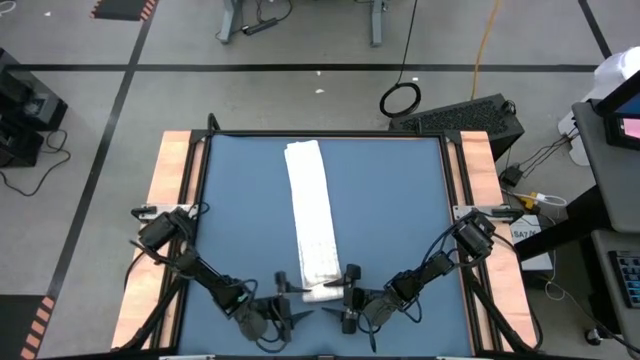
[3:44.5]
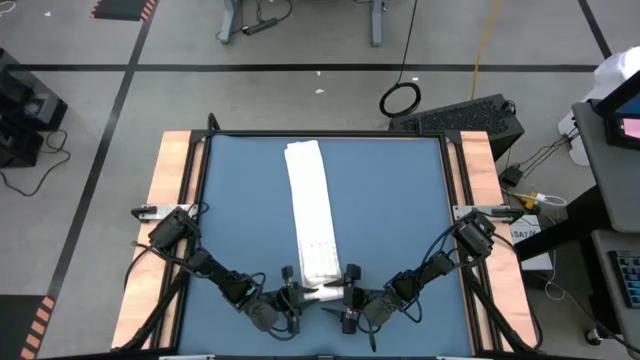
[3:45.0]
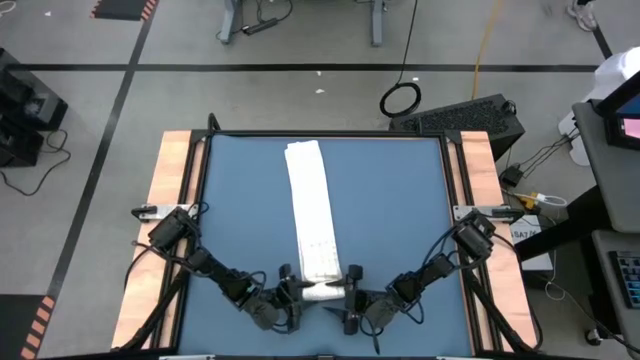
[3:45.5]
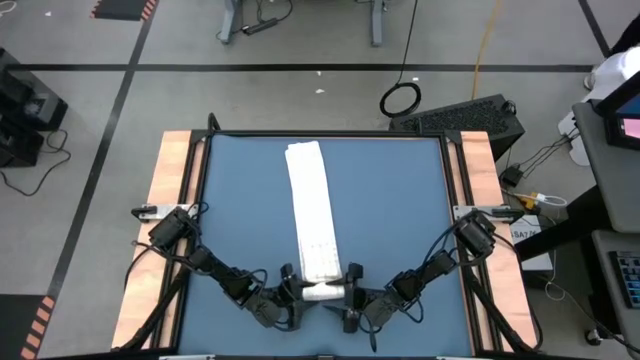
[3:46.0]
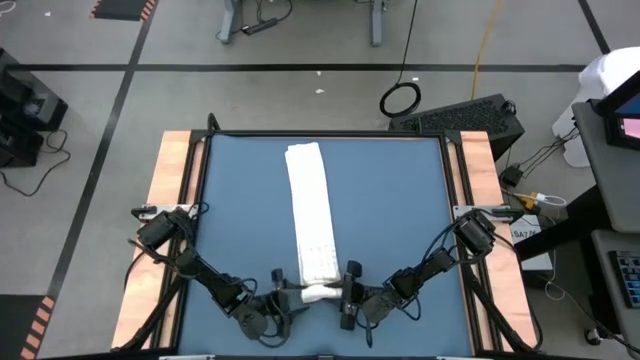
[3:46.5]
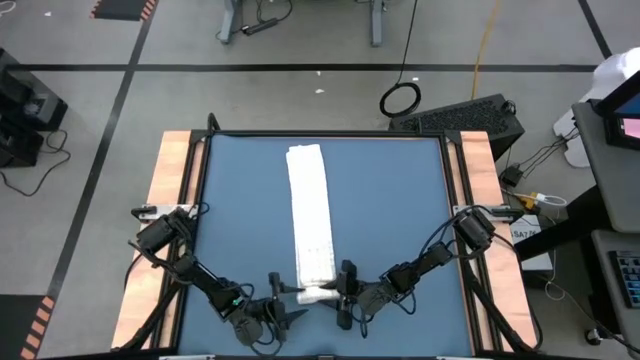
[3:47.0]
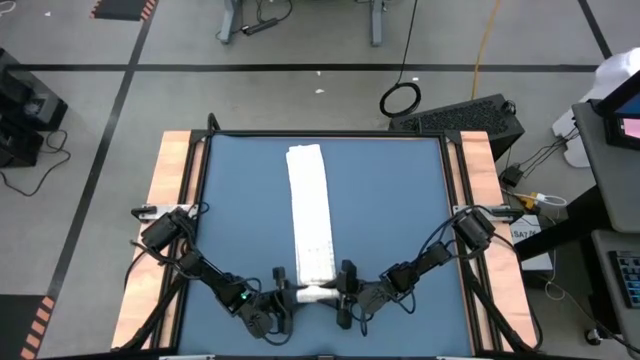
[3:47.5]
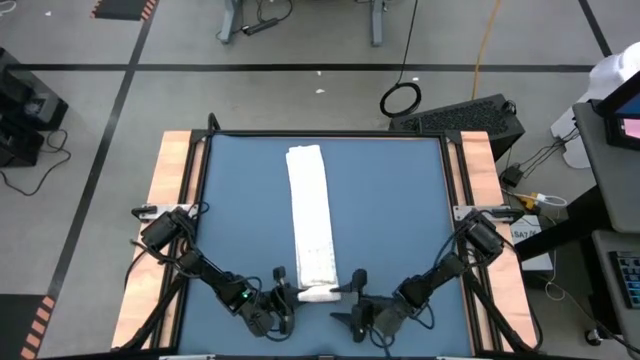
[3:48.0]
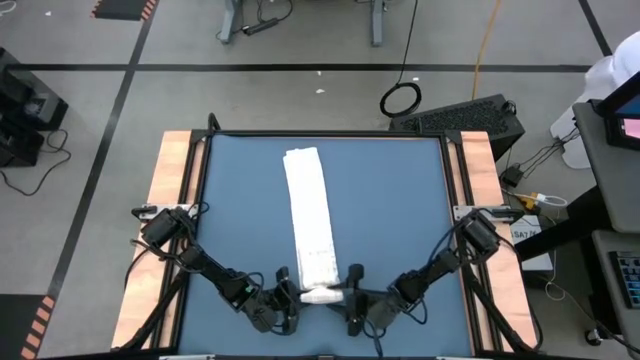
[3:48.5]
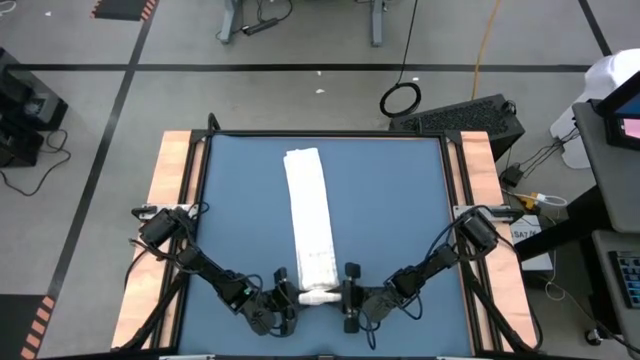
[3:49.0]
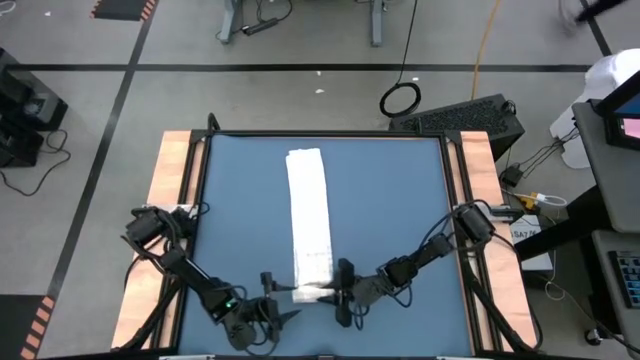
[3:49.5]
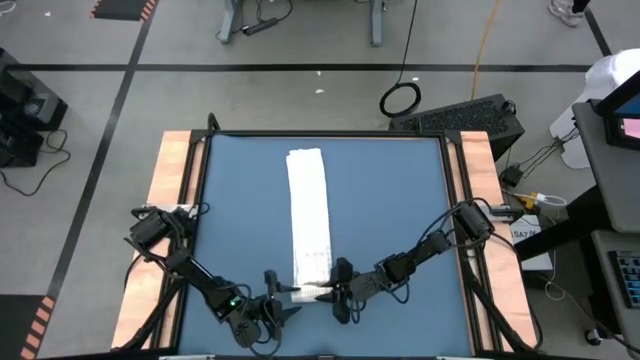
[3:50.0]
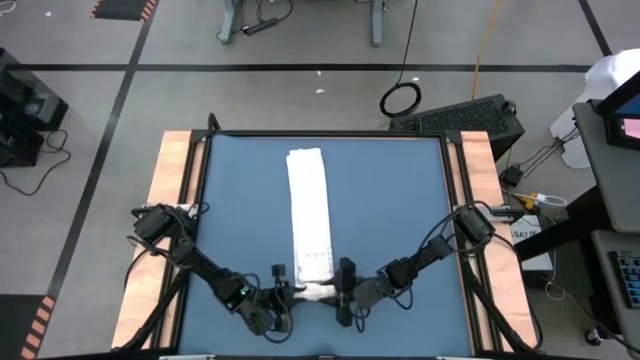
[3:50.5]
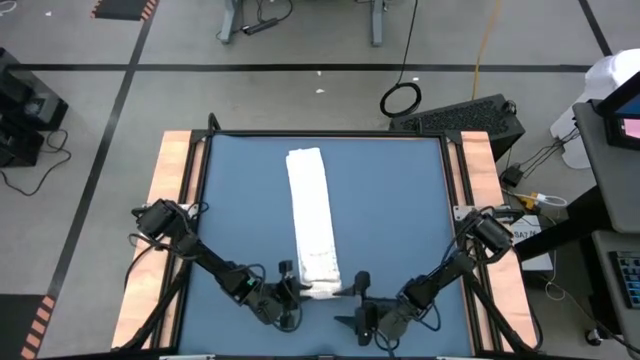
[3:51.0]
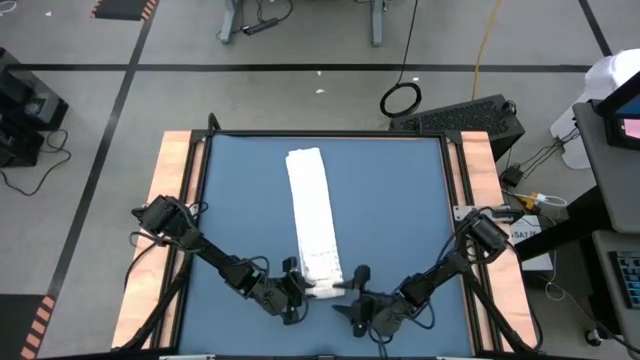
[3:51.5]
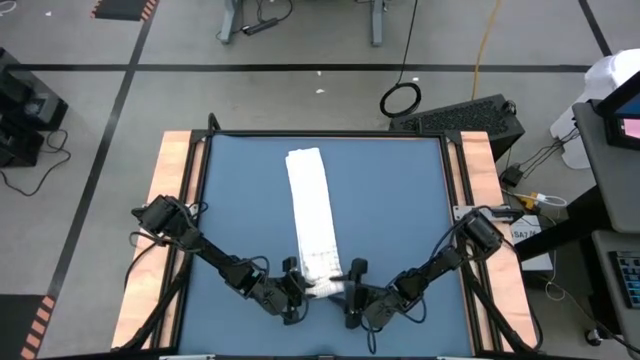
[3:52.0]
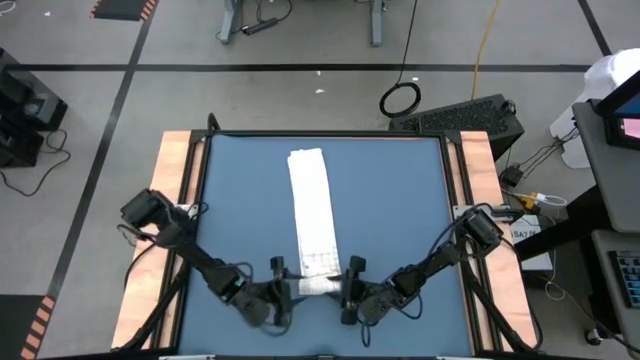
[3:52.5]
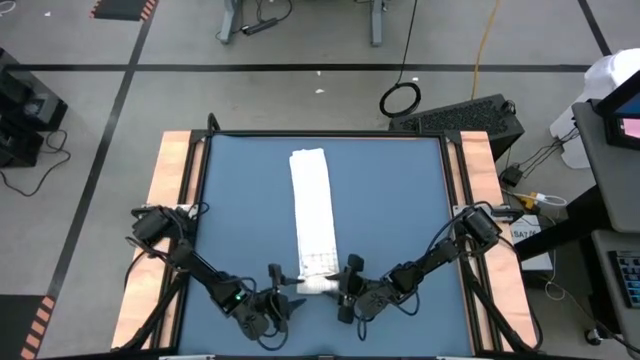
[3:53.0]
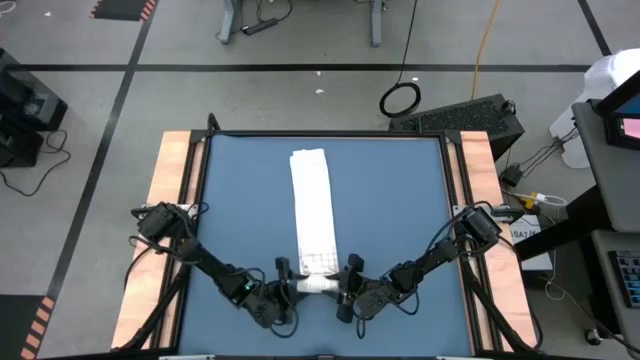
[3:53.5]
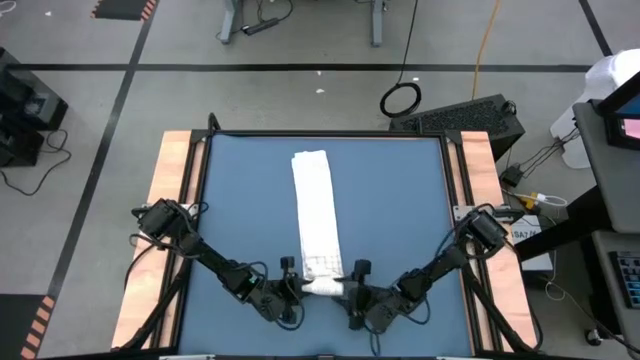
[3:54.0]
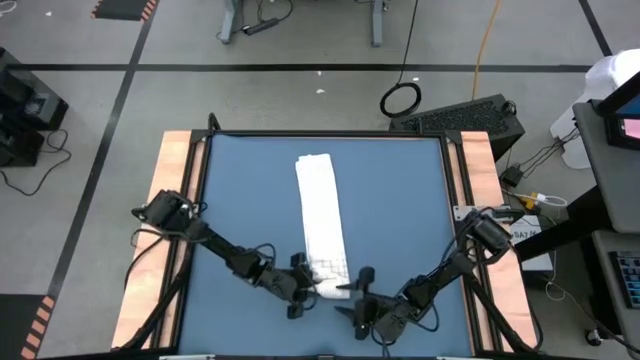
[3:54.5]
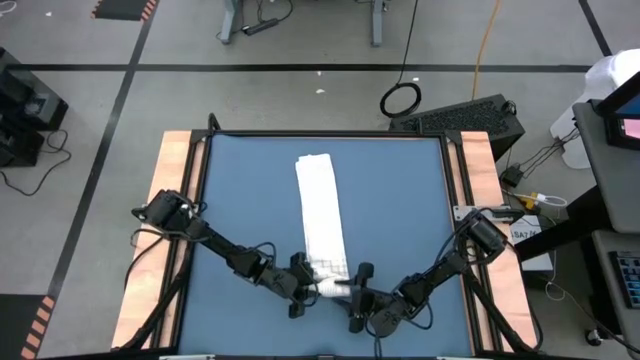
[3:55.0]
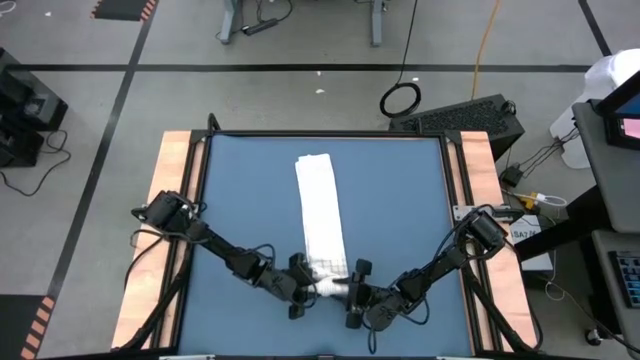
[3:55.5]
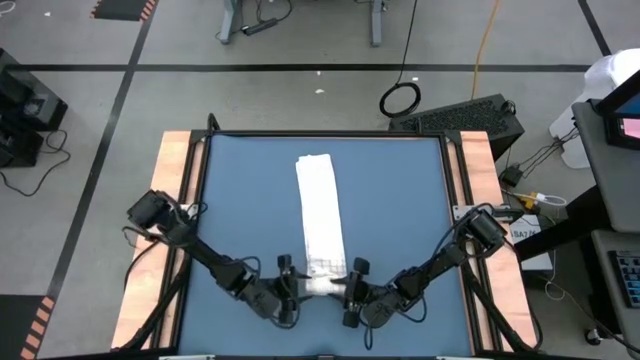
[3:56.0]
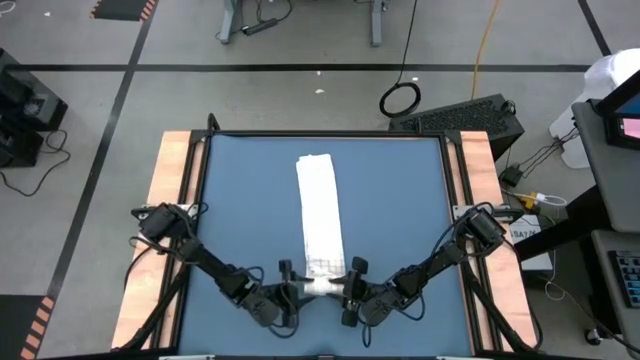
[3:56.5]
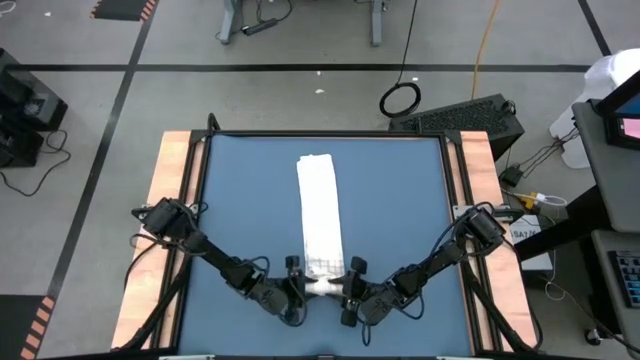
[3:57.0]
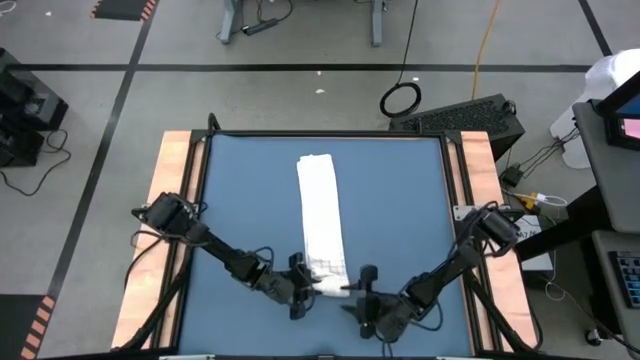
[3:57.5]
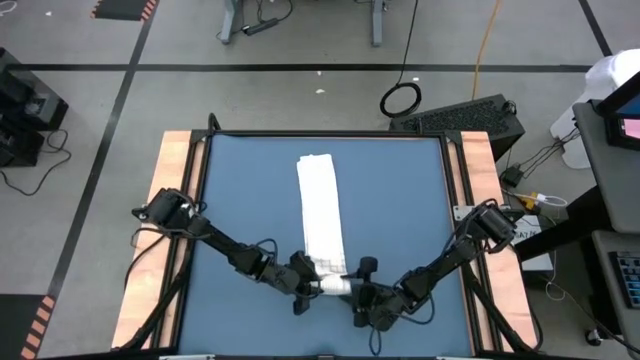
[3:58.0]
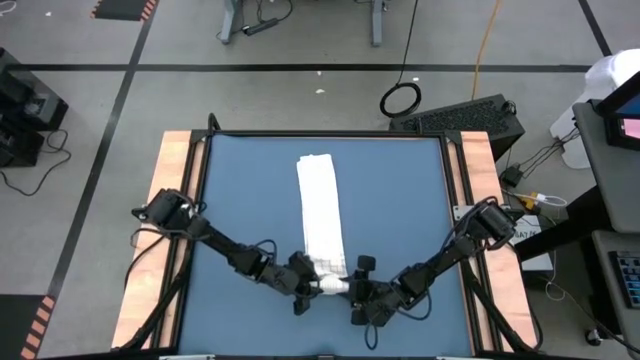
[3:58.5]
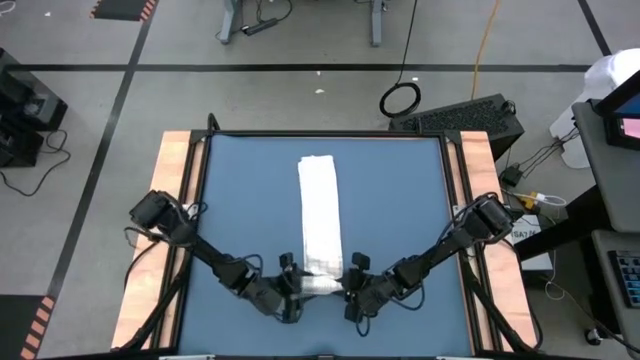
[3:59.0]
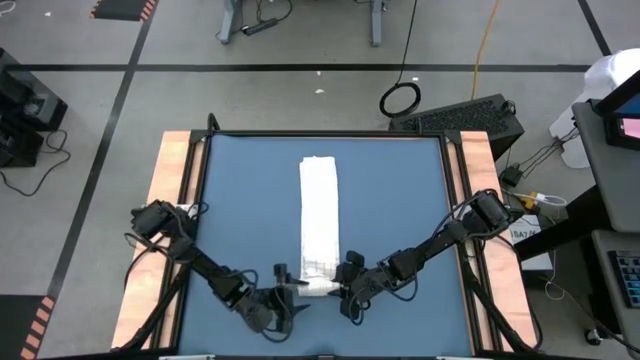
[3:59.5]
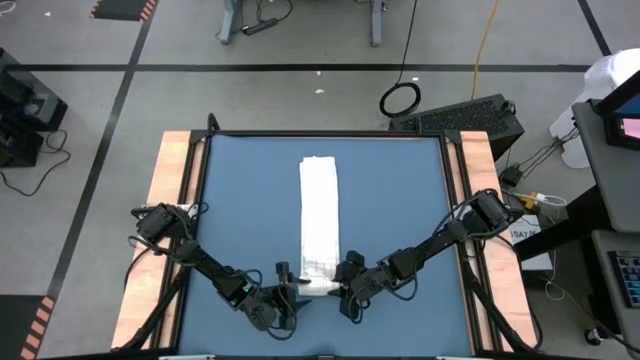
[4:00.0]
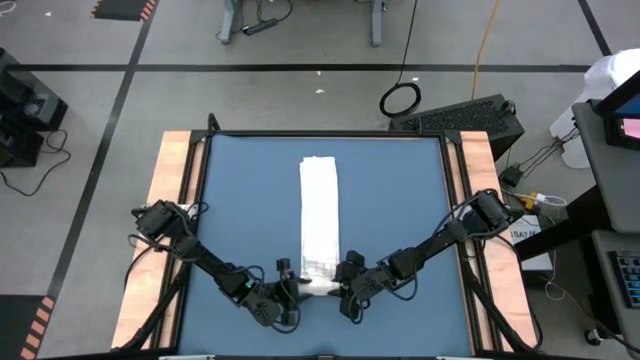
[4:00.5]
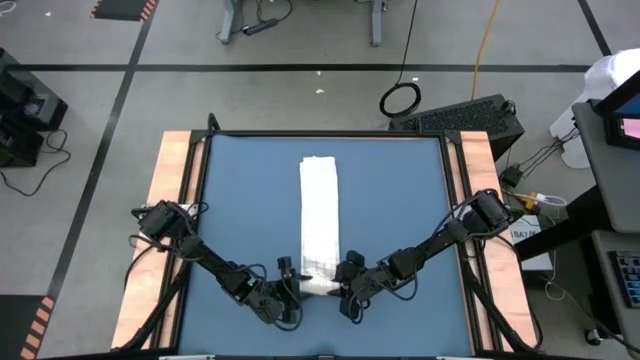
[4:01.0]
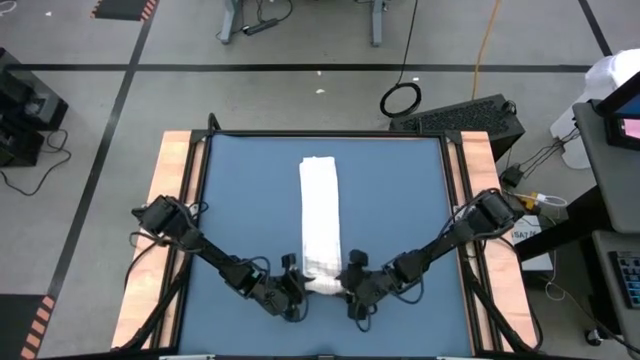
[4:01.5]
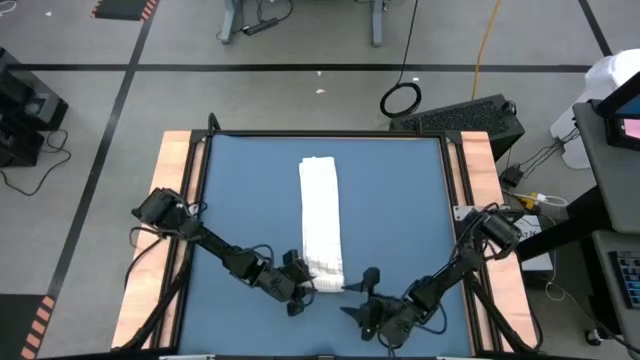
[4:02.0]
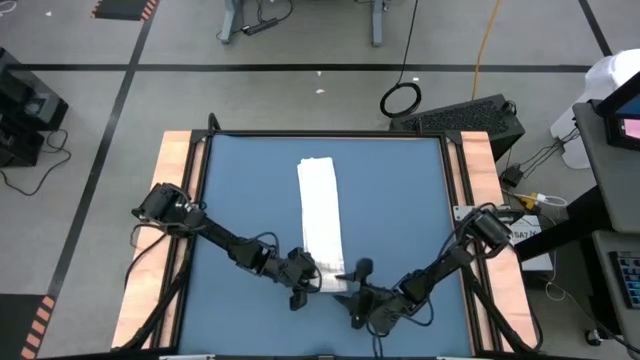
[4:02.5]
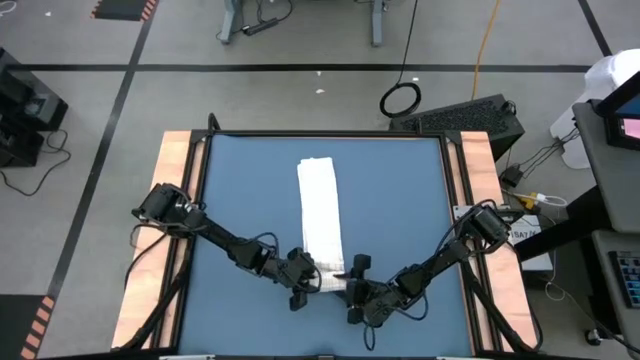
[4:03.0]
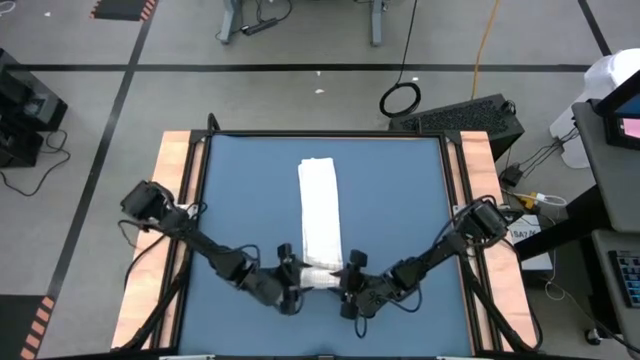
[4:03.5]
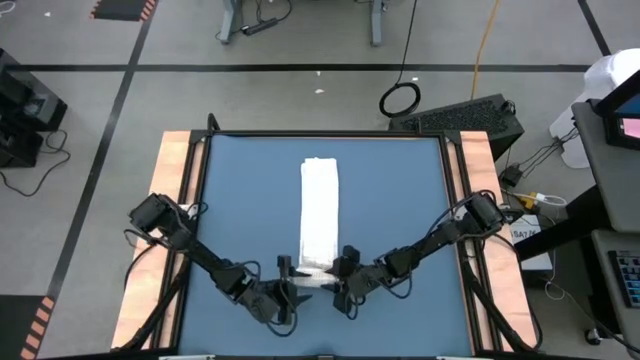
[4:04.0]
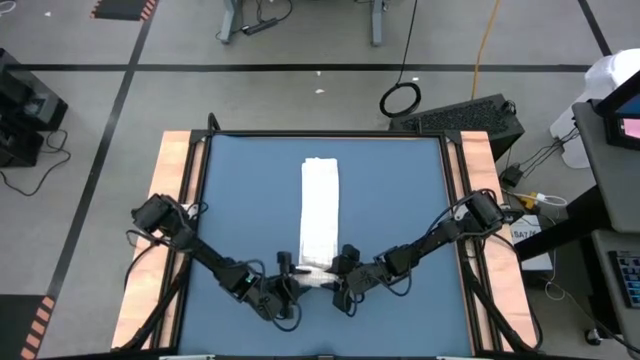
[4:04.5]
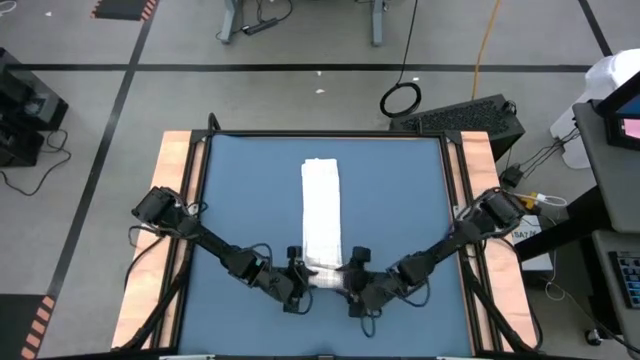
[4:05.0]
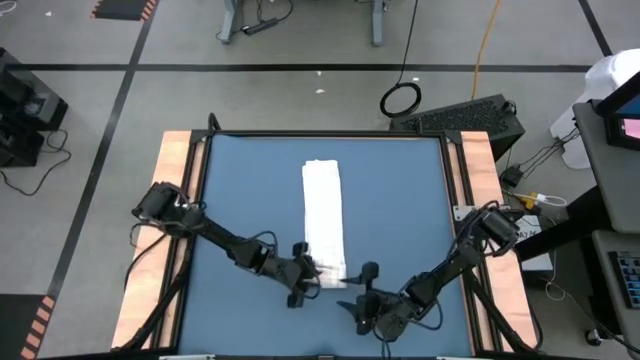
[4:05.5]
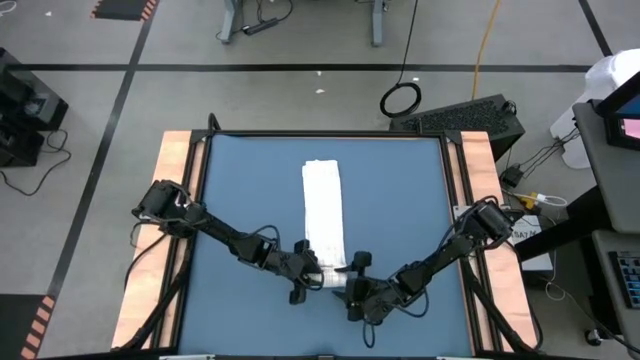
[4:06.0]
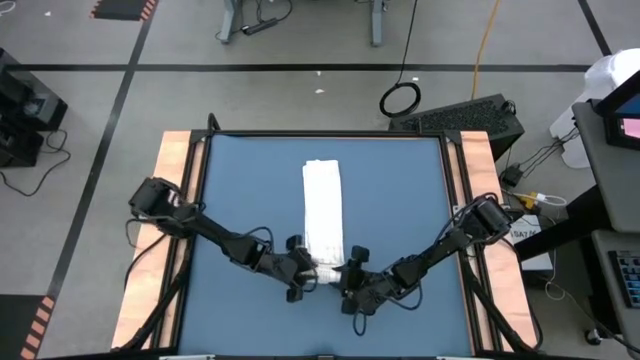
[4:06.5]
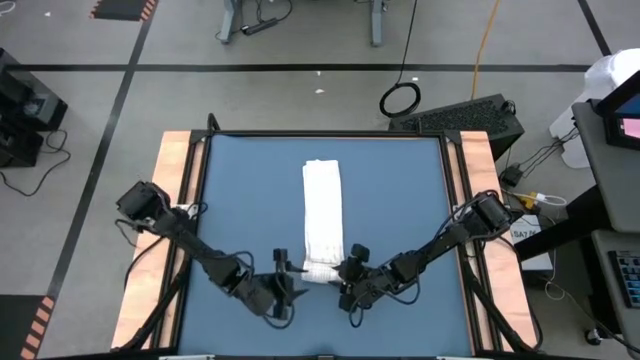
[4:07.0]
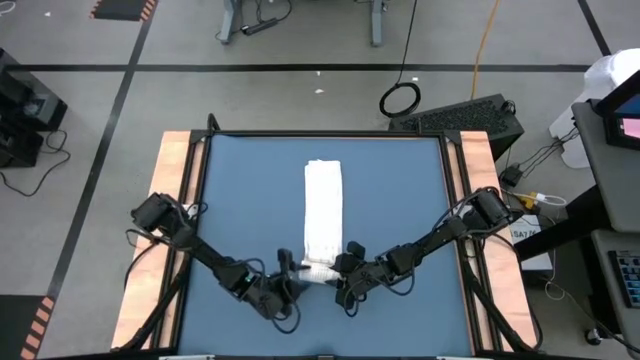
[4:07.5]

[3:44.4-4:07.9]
Task: Roll towel into tight, uniform cylinder
Roll the white towel
